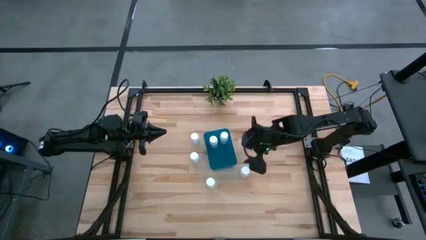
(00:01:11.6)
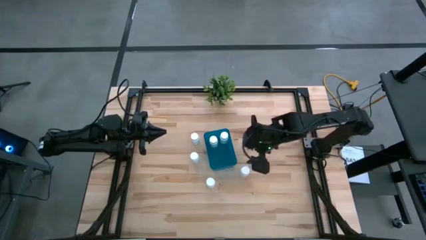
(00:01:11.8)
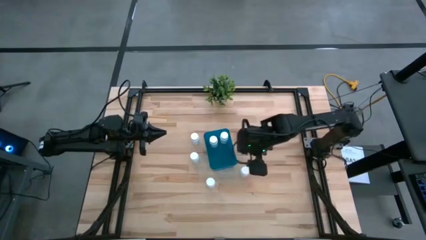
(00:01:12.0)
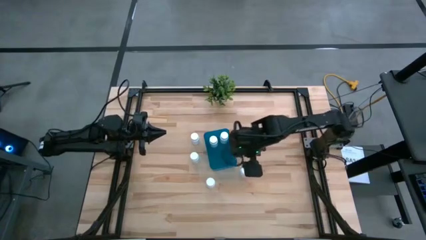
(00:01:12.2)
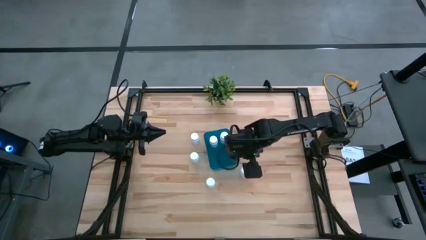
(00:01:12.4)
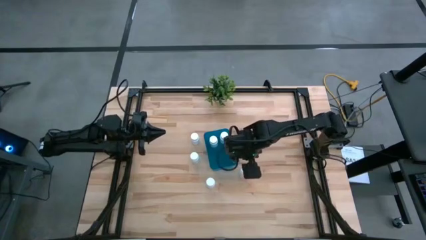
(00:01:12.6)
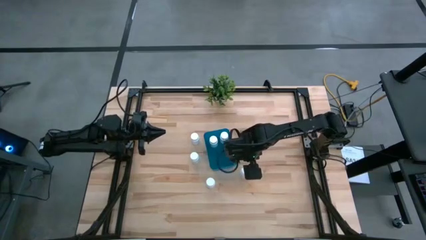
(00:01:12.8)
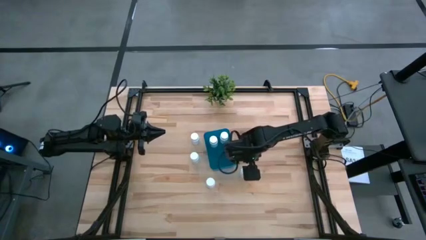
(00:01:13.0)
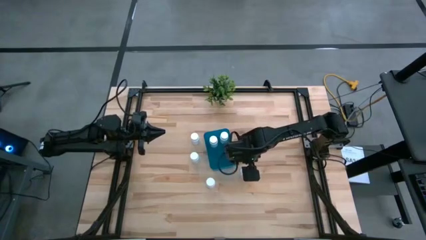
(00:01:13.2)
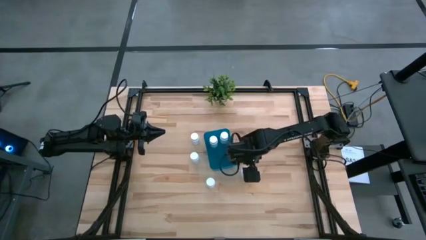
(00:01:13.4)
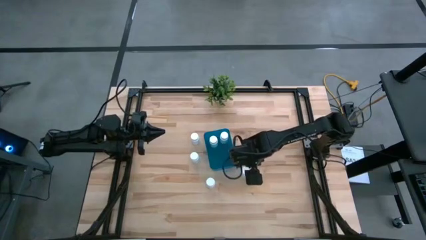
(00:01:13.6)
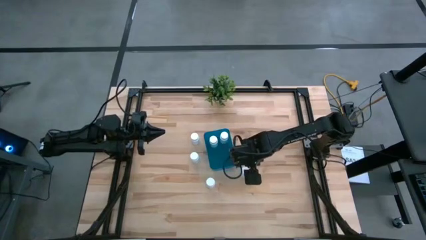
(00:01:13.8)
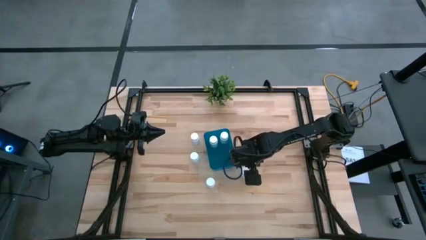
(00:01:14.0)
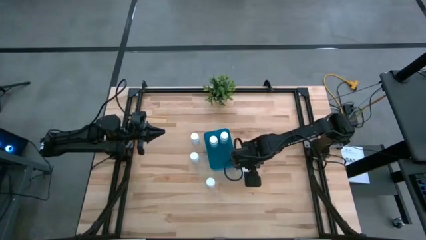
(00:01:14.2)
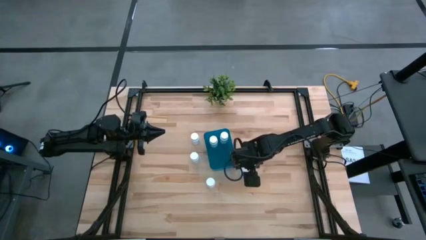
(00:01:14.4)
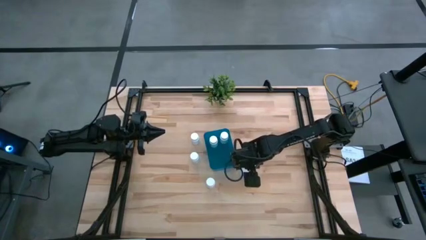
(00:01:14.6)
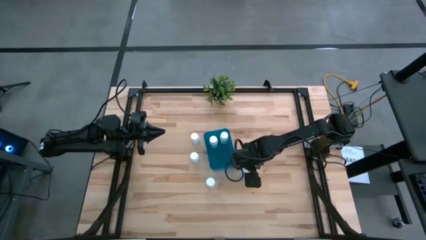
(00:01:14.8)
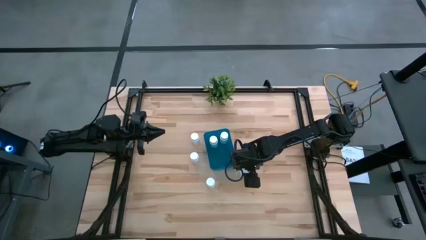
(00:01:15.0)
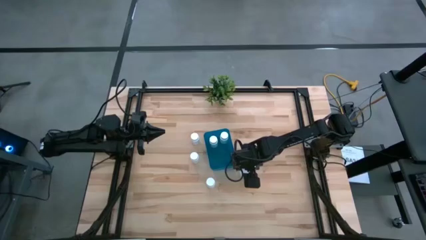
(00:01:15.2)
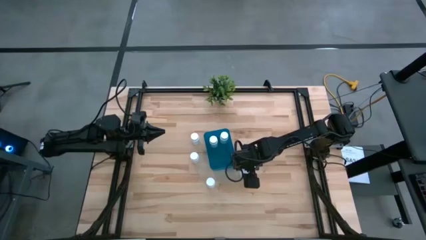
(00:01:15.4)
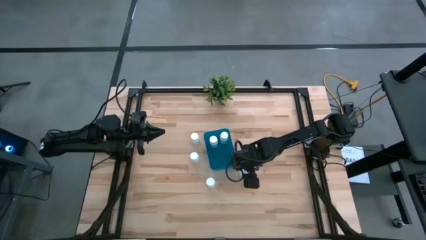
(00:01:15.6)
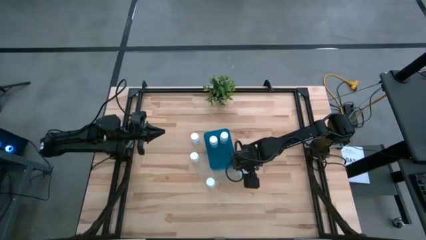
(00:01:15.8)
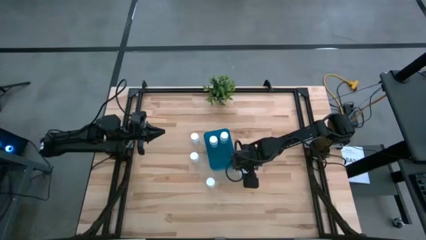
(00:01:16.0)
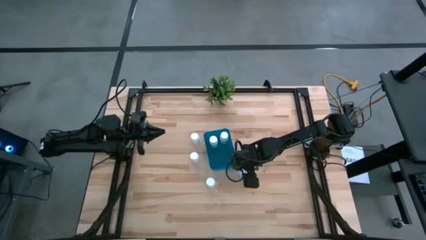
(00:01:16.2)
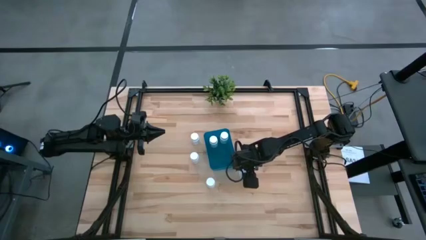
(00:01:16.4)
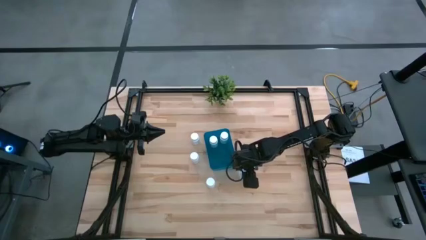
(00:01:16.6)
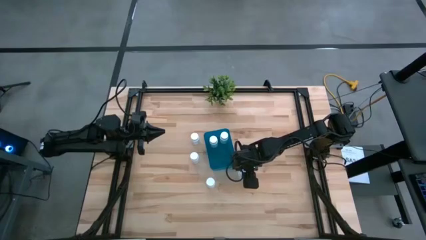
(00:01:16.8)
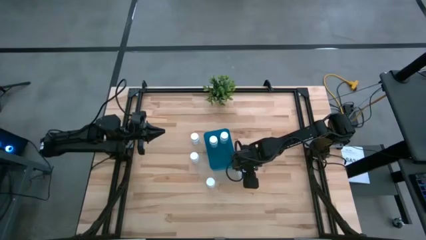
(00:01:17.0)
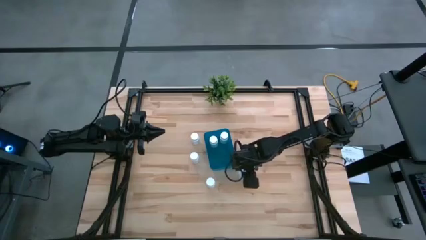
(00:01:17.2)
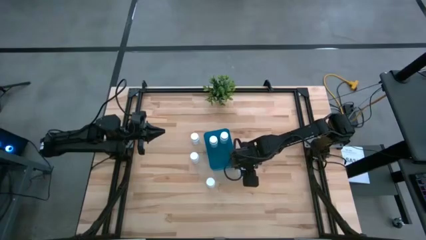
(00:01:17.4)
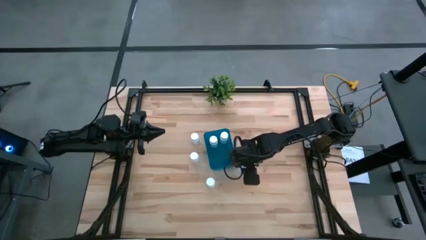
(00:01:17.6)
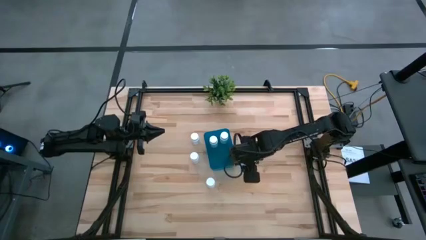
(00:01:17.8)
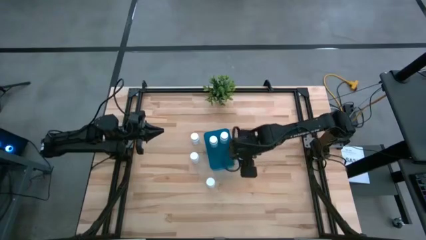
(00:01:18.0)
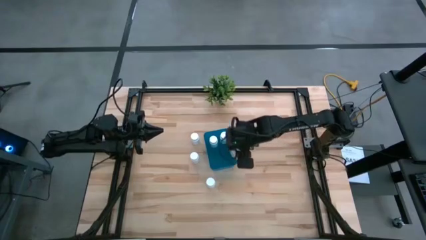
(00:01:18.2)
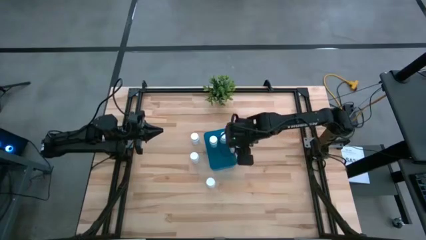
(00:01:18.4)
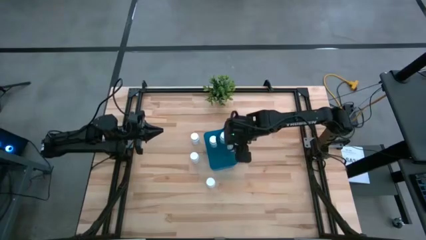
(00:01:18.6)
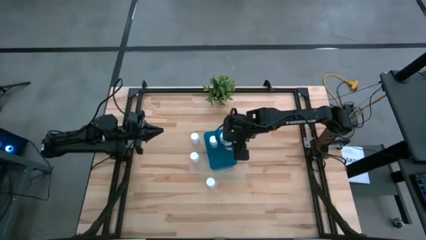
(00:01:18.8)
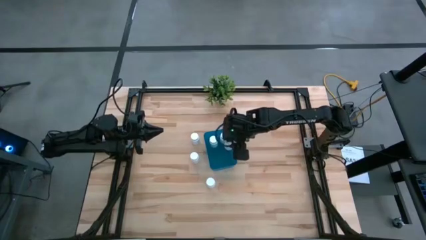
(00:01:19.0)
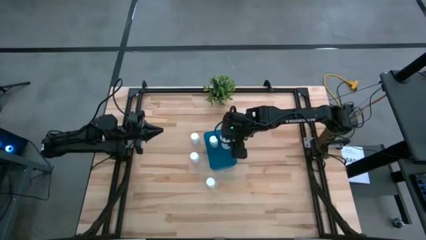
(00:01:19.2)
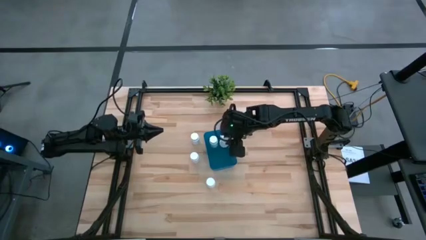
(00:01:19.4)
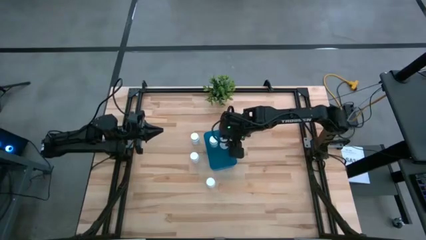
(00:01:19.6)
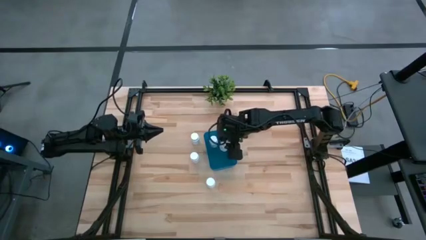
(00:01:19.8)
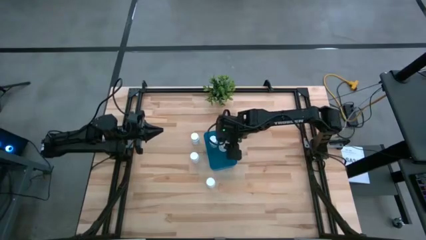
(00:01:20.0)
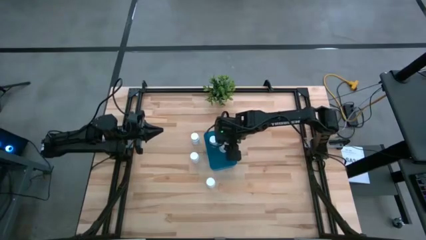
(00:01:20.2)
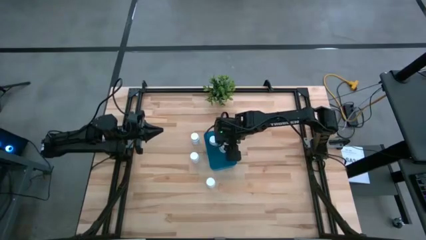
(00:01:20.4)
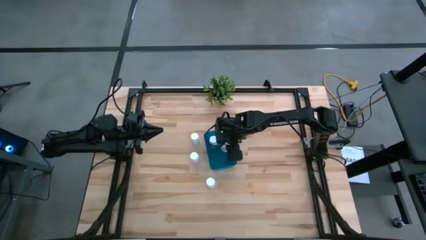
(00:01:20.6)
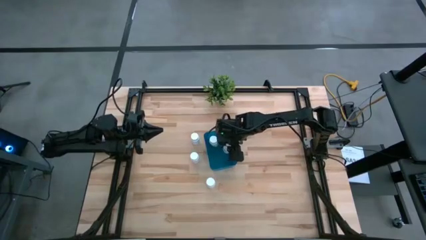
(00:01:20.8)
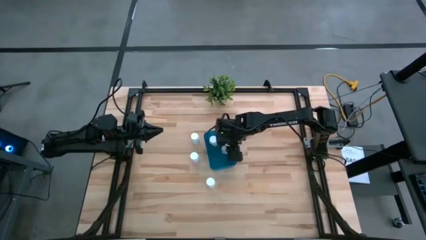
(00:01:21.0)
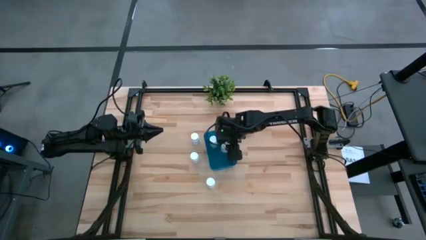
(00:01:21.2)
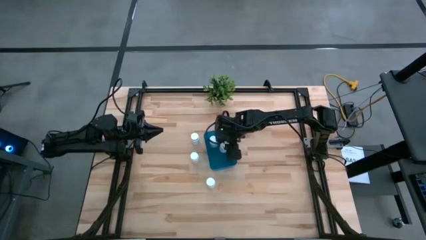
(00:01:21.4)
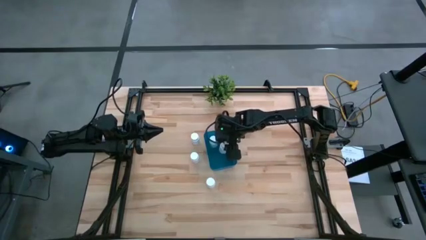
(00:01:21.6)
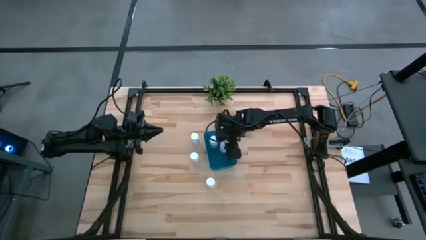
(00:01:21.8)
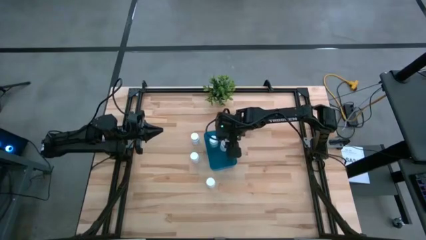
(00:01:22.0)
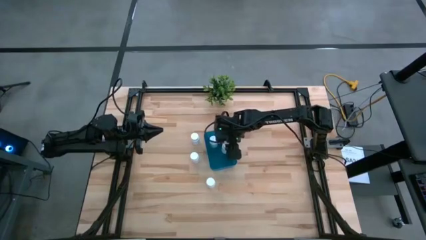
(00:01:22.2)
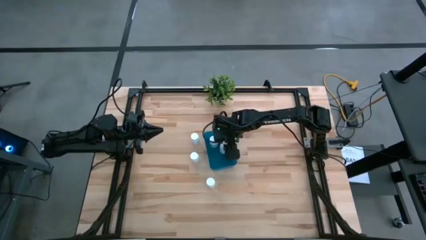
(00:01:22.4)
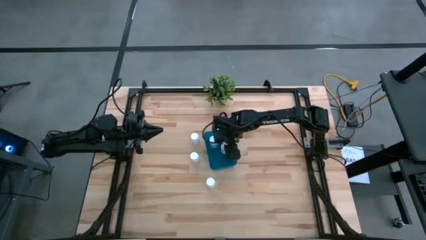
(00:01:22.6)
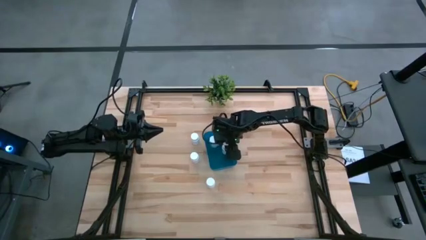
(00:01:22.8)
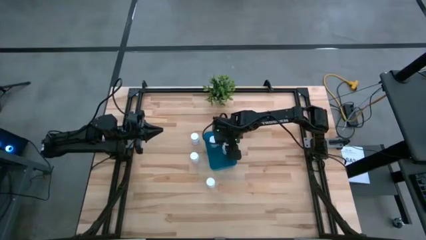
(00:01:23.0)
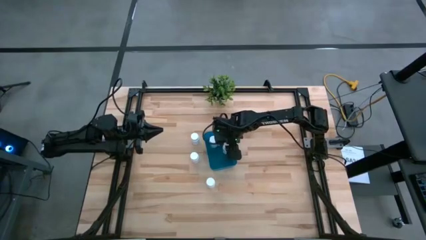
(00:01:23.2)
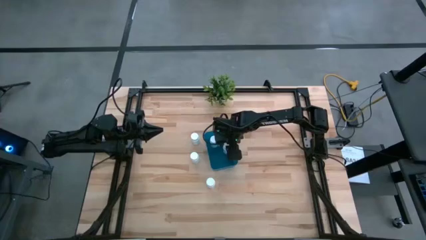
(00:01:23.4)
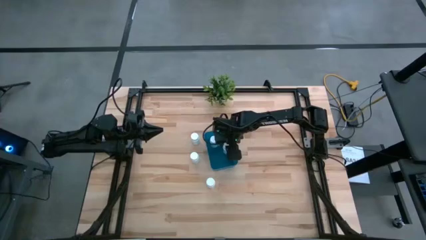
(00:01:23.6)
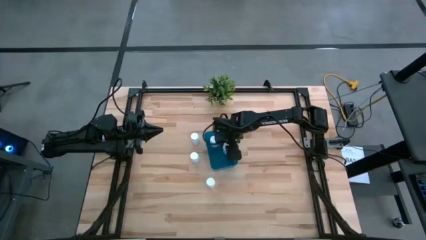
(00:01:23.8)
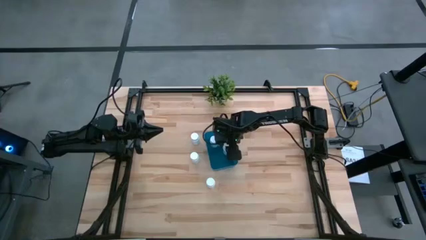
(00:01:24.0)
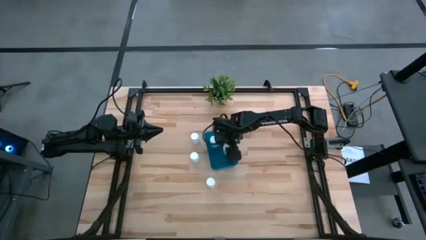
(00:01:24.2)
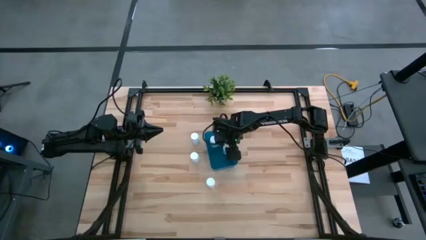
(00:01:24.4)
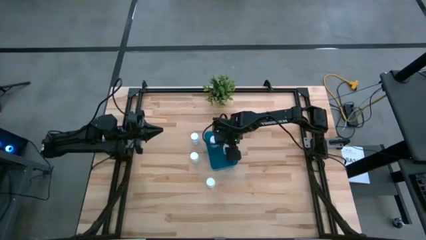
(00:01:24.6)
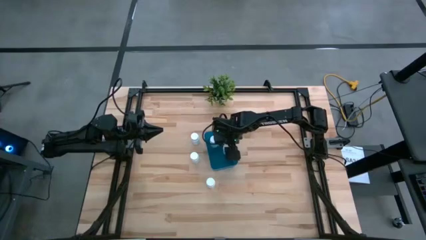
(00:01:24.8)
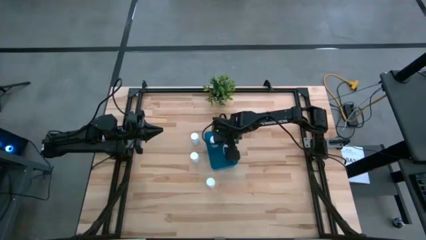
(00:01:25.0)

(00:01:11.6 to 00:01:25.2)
Task: Pick and place pill bottles into a basket
Put the white medicine bottle into the blue bin
